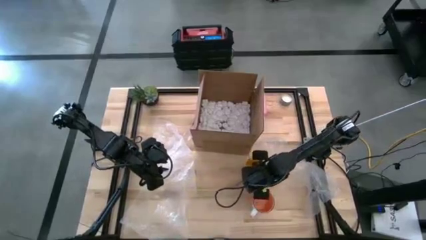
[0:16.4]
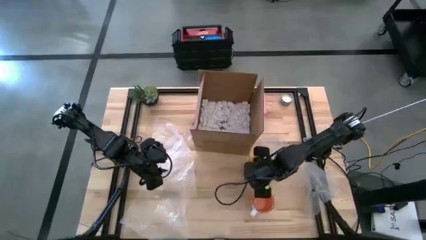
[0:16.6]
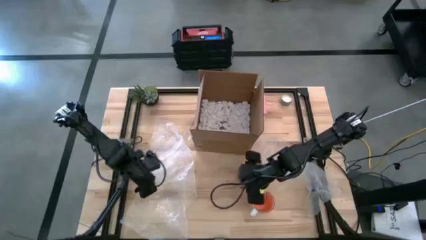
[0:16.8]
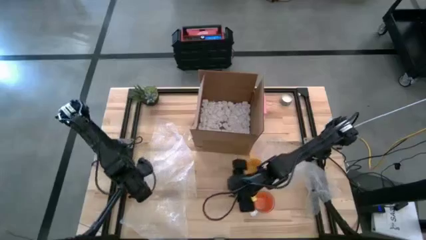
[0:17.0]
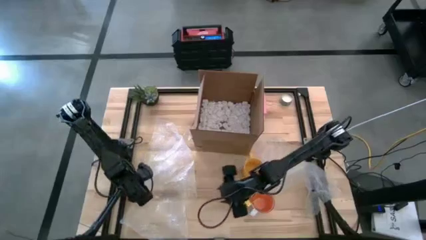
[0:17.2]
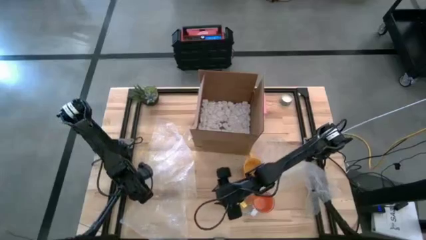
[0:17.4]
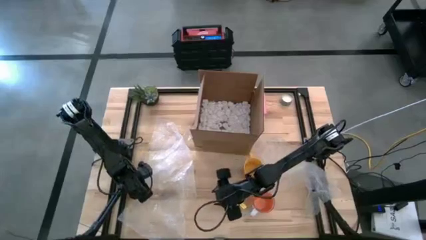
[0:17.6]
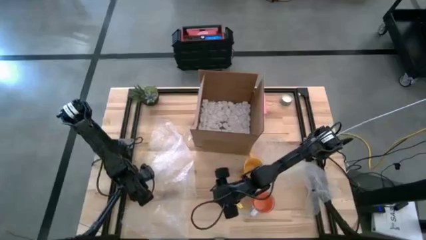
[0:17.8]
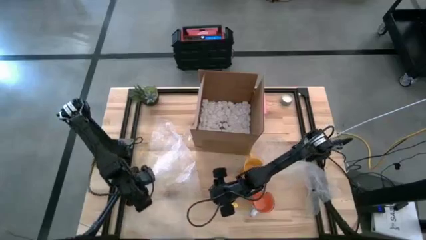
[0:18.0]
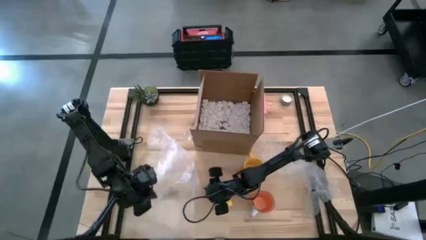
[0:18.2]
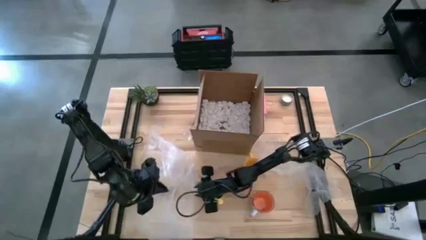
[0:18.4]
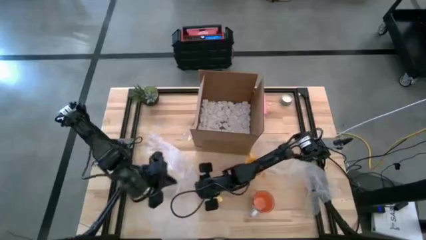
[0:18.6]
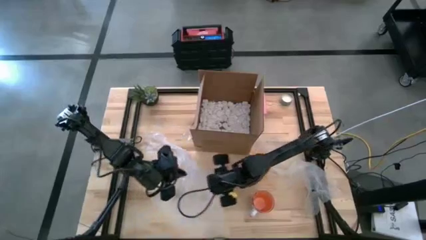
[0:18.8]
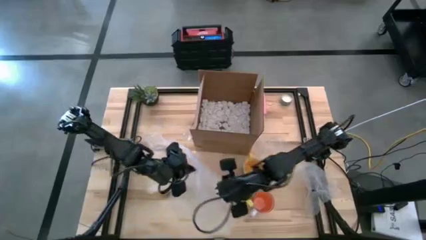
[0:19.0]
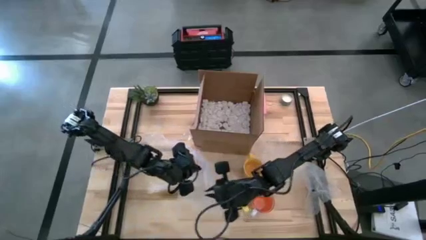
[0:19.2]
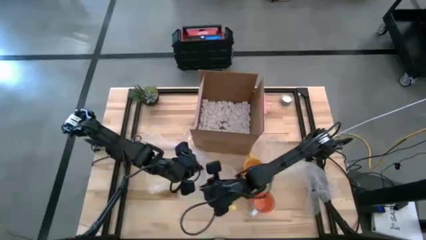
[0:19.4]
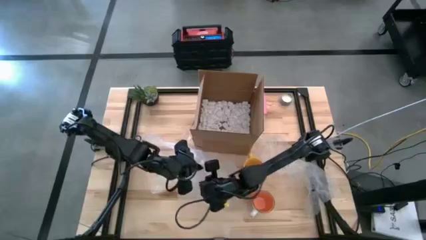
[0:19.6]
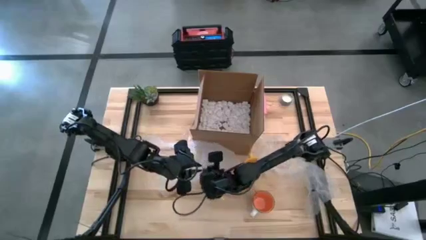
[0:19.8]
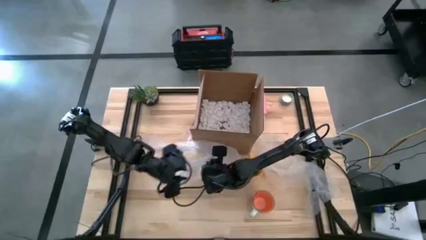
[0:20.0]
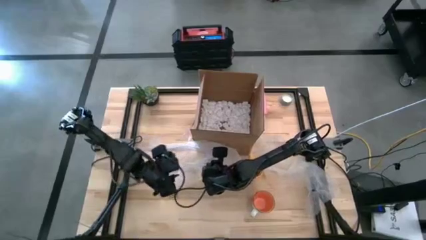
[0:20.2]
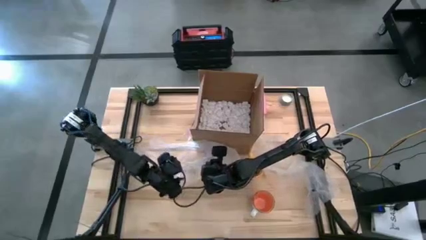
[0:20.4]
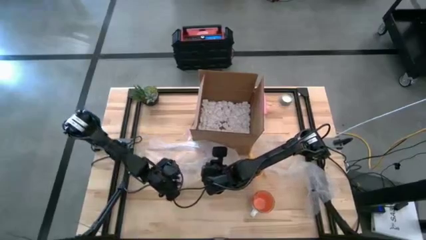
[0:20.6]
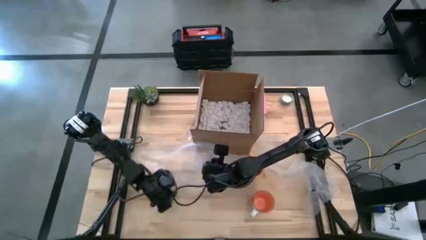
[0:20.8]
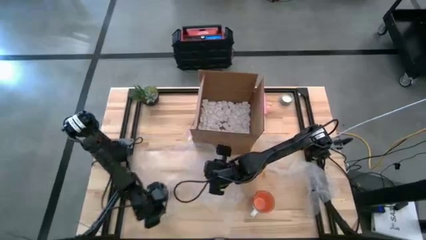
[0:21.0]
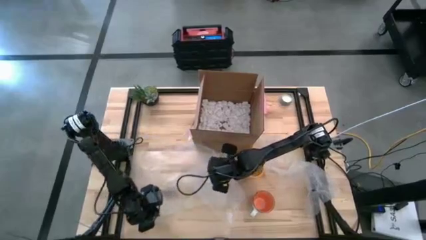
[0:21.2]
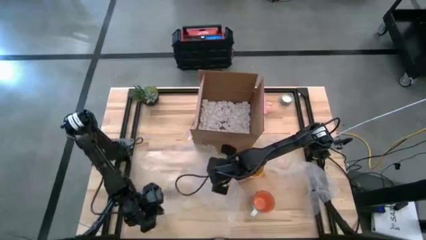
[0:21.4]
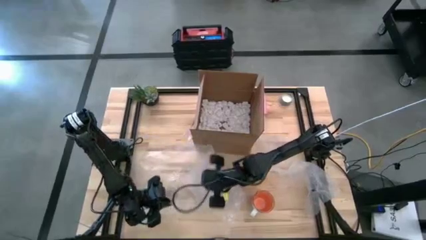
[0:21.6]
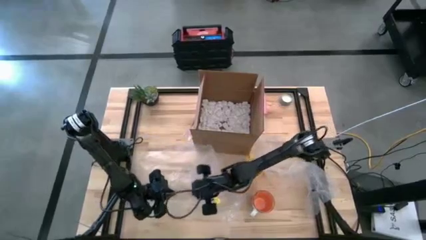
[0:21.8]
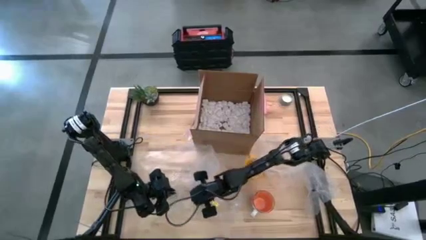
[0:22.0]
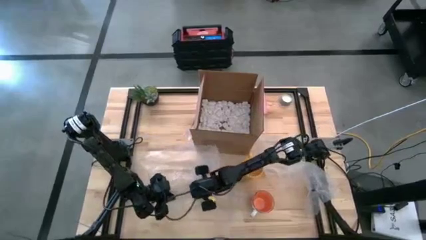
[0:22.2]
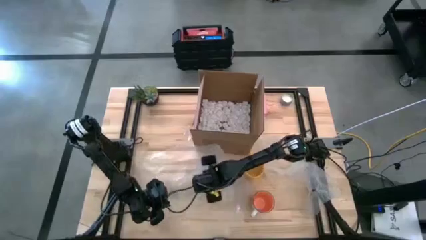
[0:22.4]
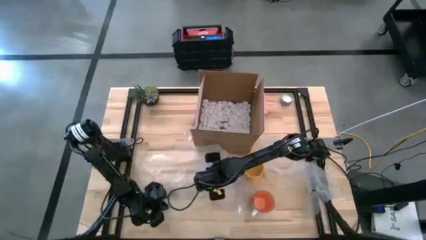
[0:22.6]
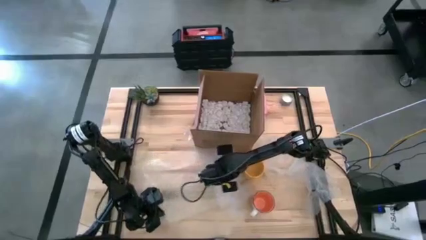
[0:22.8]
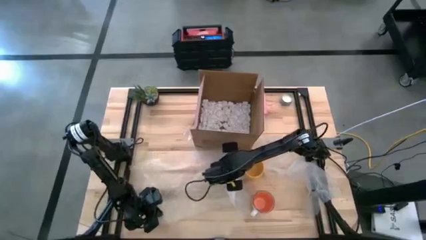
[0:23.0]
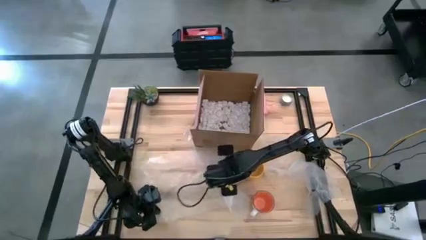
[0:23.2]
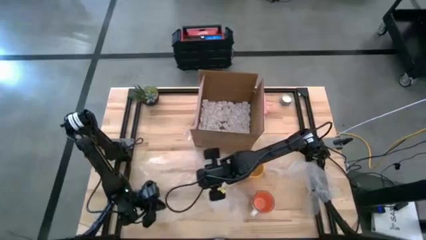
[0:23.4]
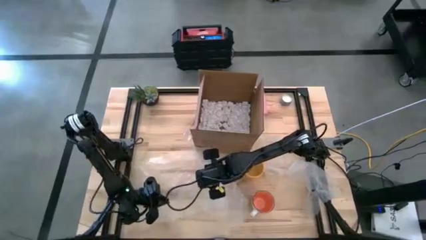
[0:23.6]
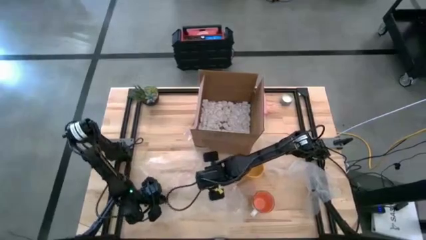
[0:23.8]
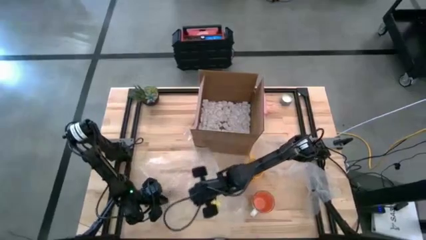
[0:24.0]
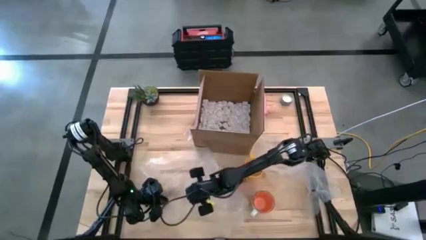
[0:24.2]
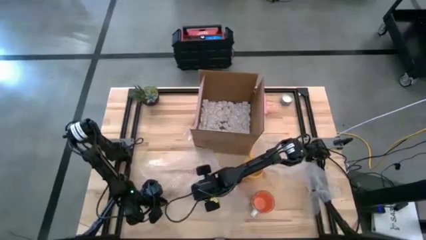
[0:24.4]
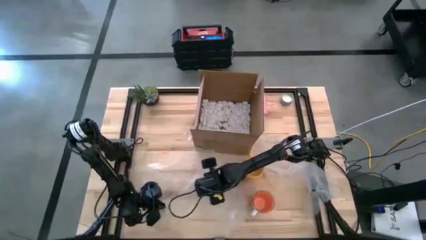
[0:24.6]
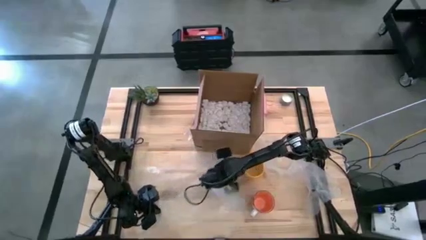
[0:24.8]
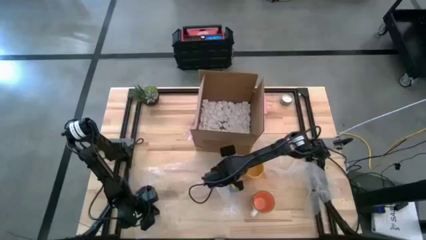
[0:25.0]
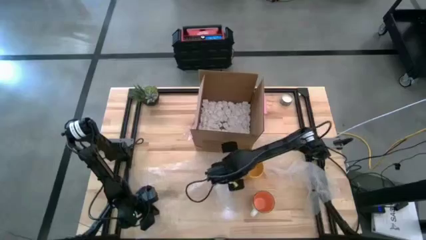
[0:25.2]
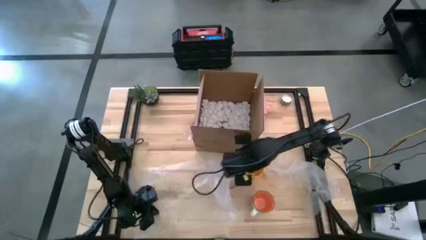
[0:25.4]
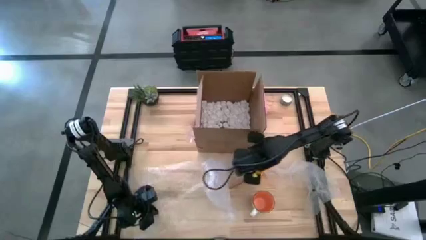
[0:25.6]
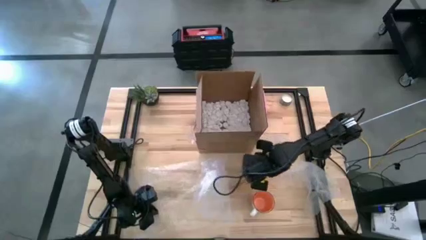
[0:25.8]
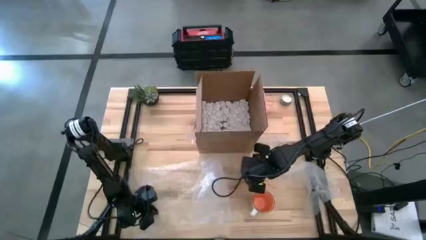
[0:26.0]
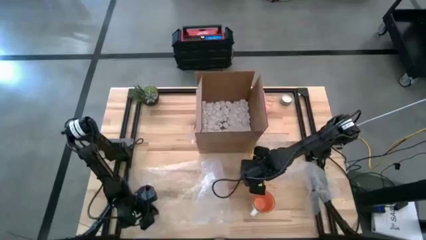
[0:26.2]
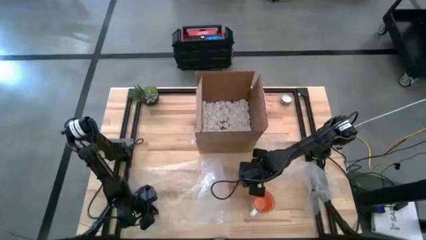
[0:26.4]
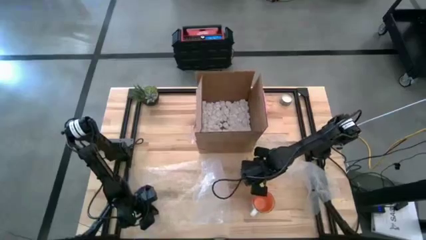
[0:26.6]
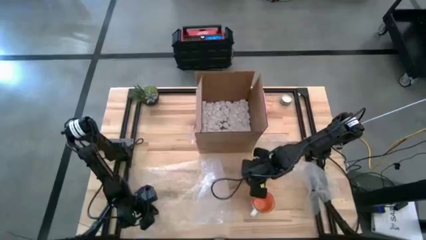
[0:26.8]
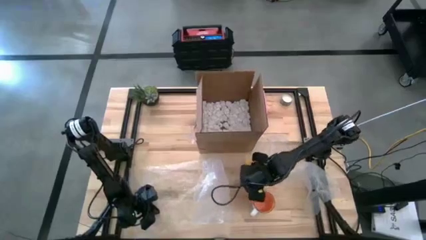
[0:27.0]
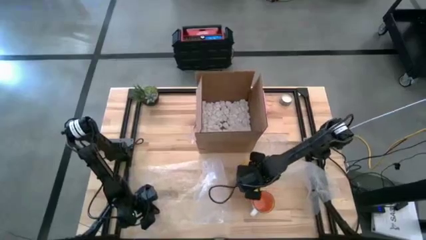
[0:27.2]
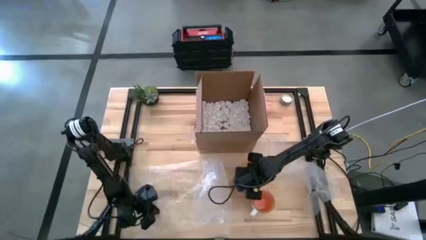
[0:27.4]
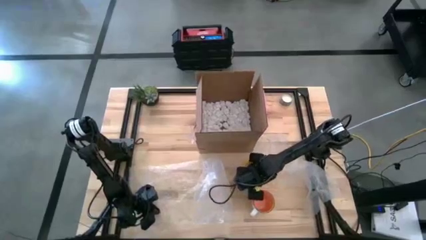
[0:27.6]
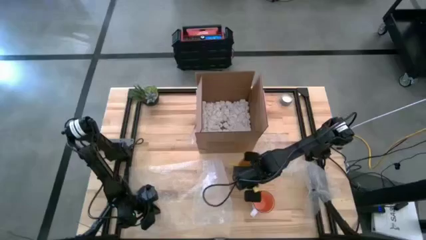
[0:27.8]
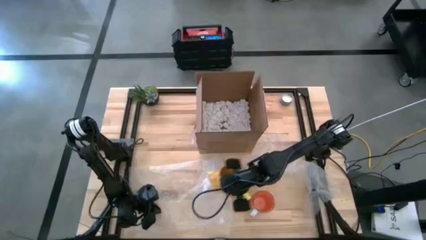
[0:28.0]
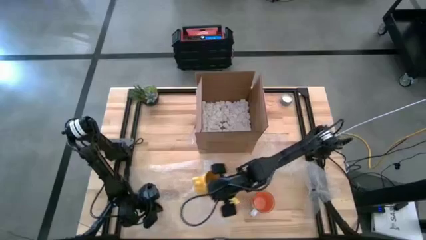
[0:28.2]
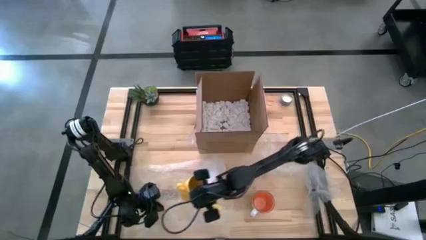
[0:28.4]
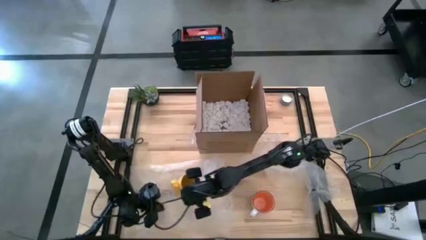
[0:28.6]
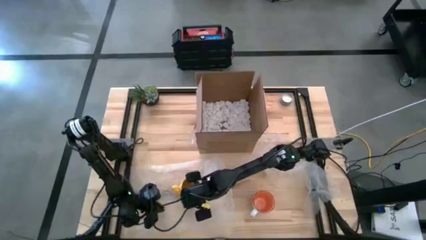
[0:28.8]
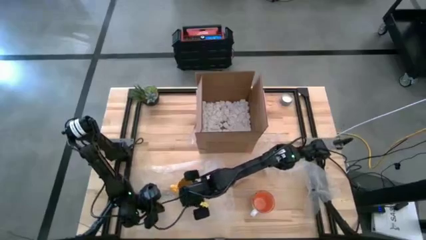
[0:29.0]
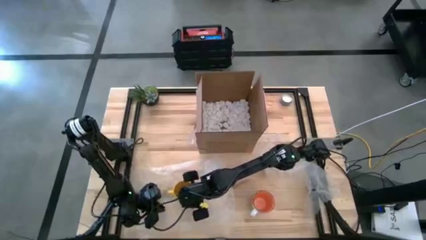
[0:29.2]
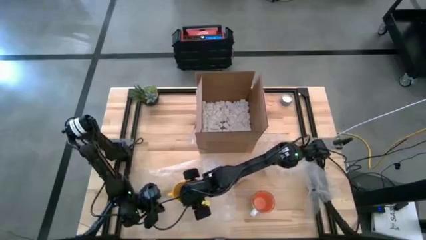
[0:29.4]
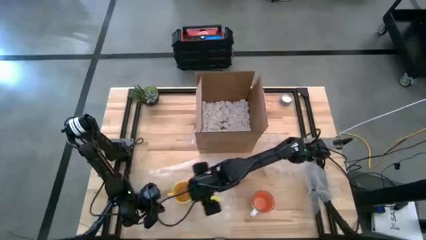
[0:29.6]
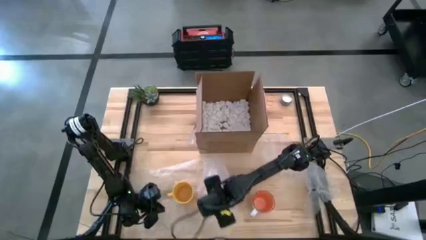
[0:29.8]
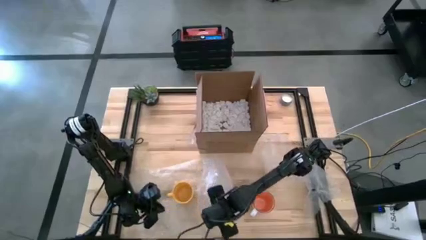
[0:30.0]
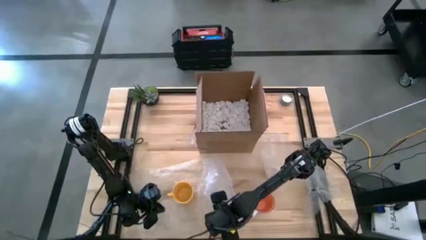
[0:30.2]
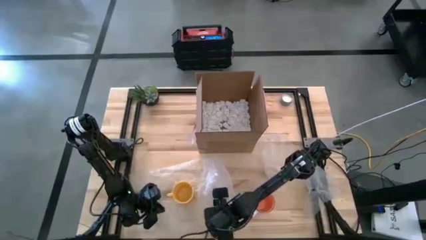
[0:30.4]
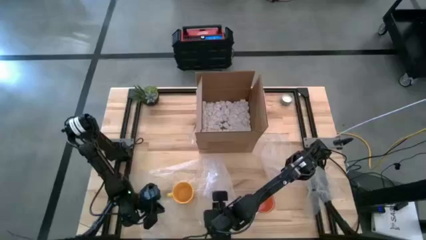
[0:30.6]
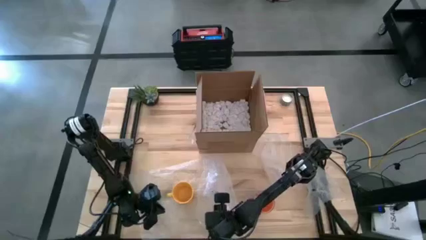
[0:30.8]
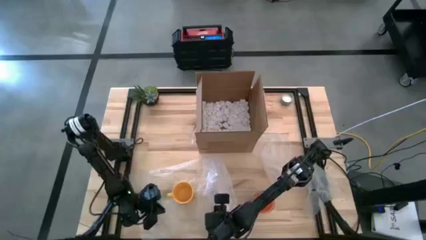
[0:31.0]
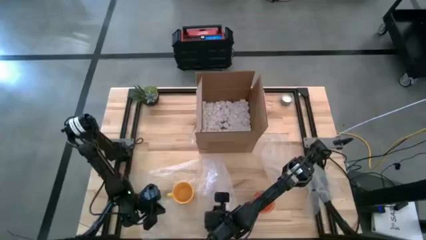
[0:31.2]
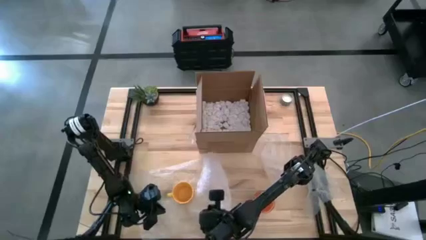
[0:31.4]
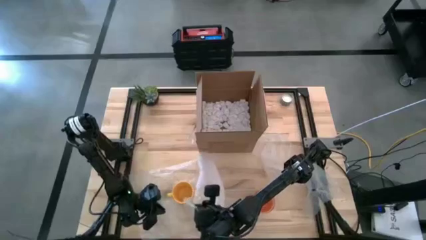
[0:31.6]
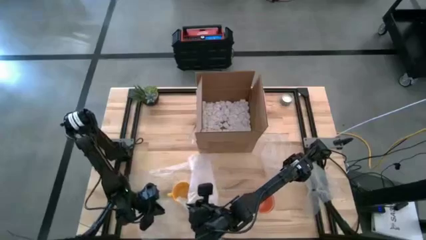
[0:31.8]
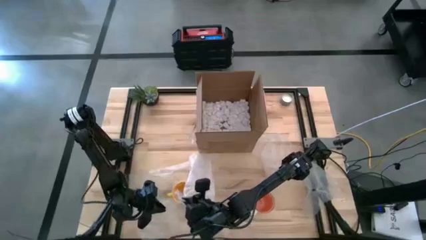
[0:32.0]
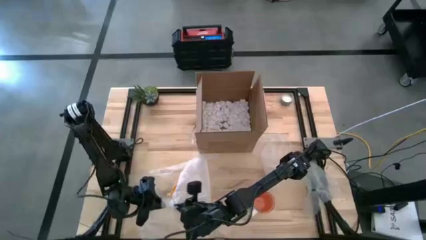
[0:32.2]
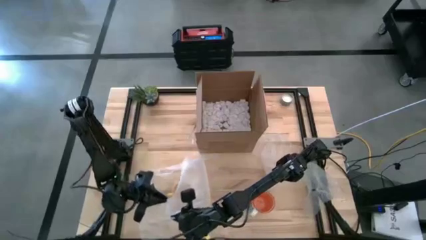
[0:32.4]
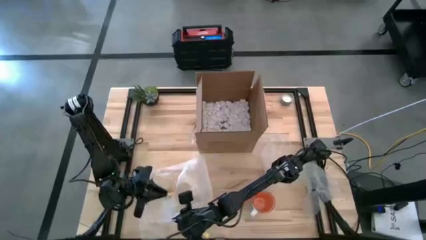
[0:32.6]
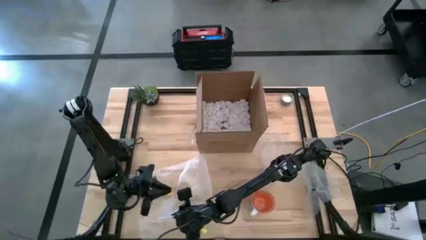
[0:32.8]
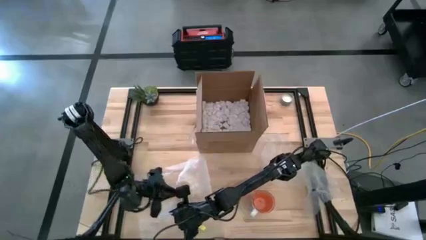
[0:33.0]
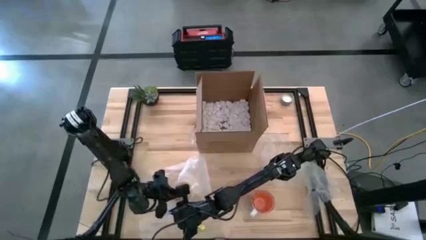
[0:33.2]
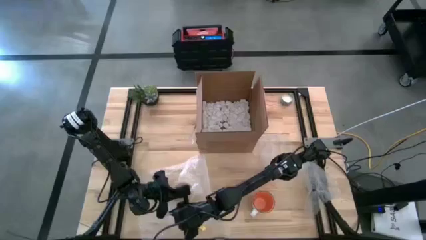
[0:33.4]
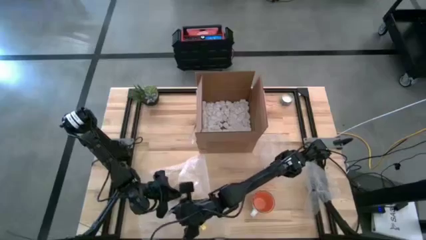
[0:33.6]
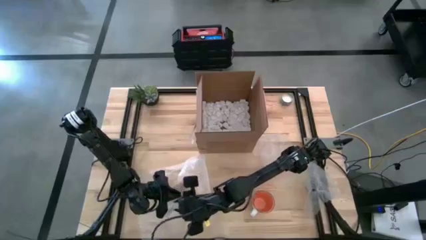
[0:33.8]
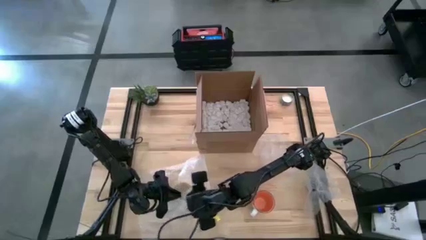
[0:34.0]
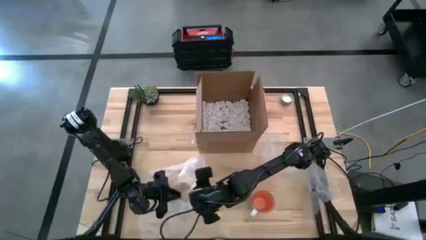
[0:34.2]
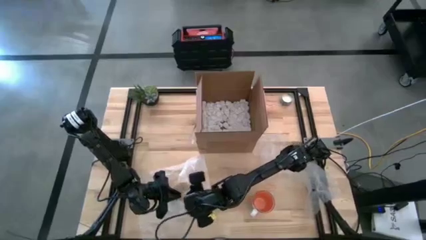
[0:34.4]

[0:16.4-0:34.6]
Task: wrap mug
Wrap the yellow mug with bubble wrap
